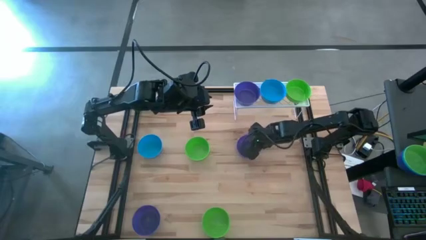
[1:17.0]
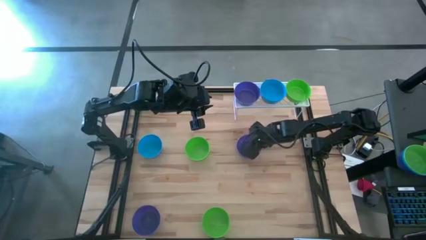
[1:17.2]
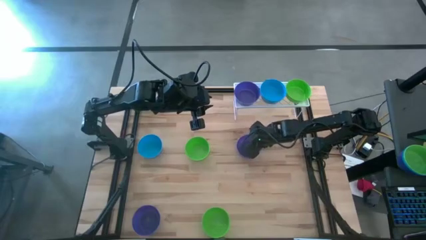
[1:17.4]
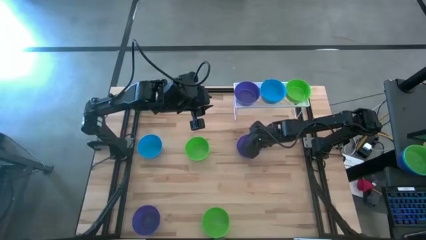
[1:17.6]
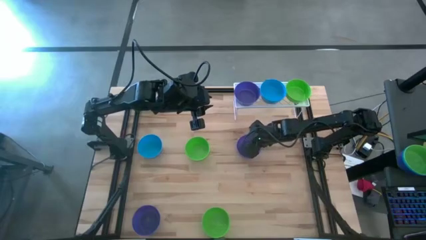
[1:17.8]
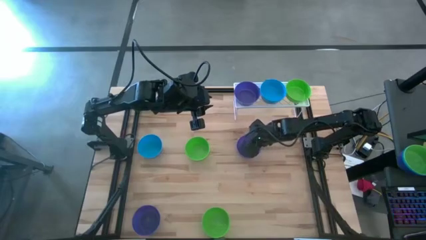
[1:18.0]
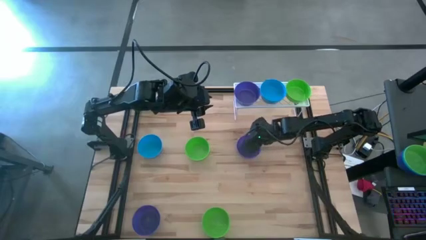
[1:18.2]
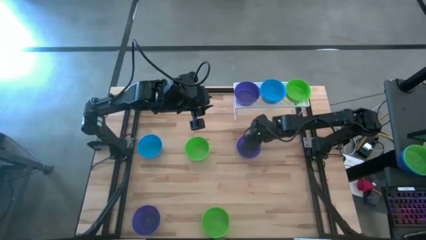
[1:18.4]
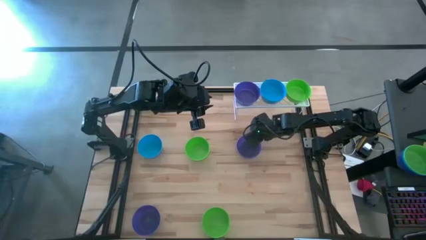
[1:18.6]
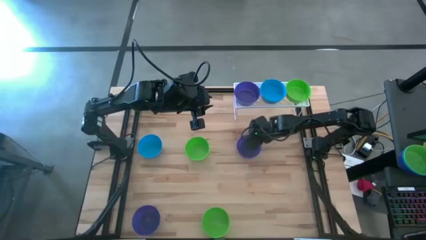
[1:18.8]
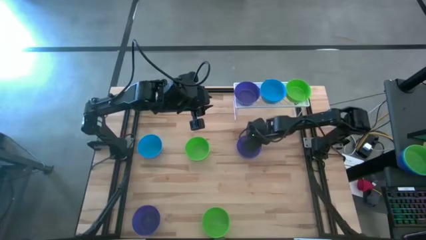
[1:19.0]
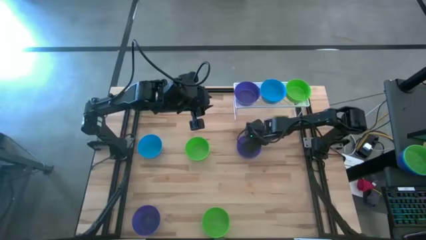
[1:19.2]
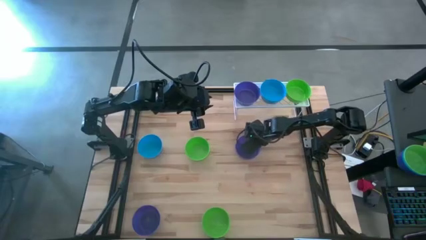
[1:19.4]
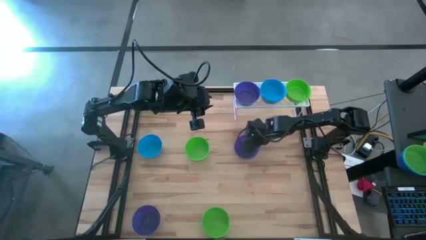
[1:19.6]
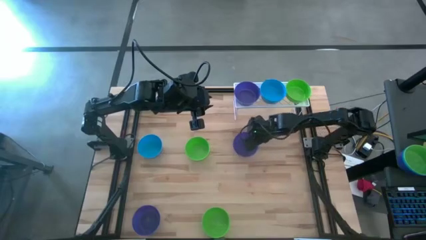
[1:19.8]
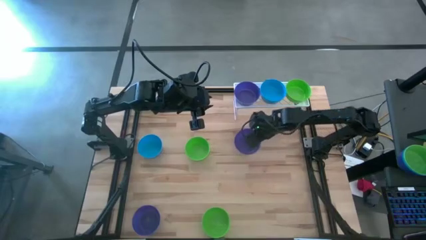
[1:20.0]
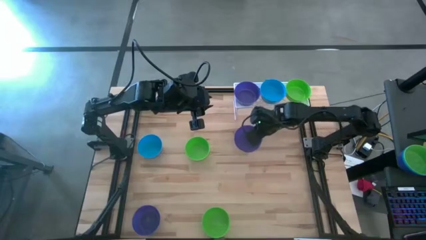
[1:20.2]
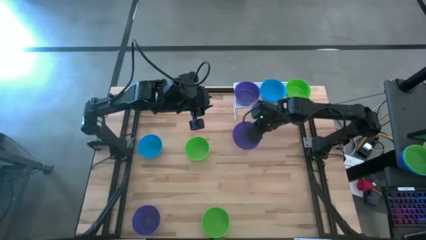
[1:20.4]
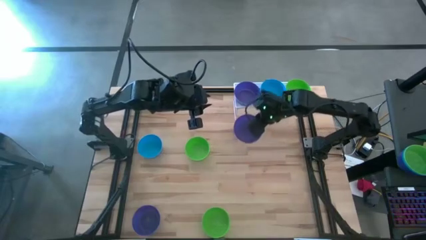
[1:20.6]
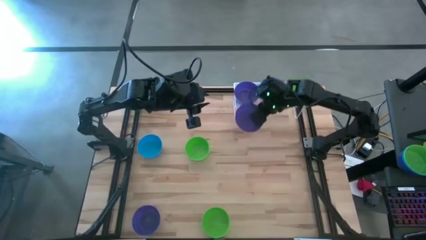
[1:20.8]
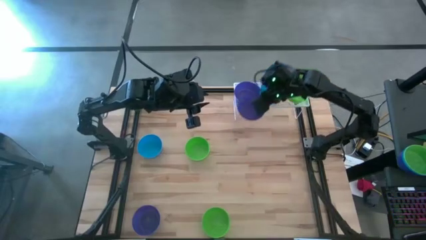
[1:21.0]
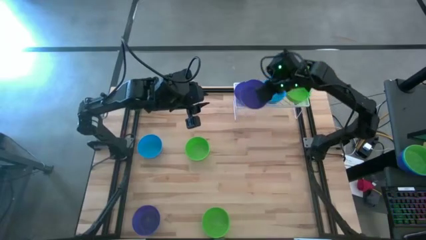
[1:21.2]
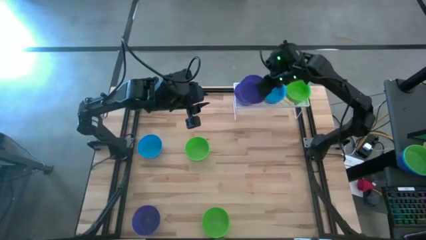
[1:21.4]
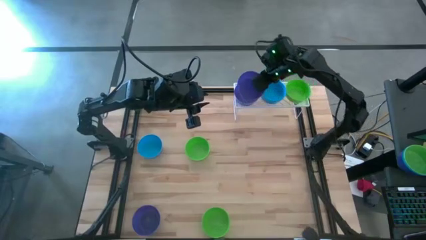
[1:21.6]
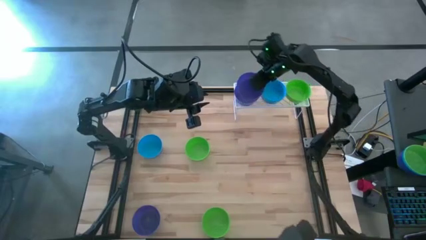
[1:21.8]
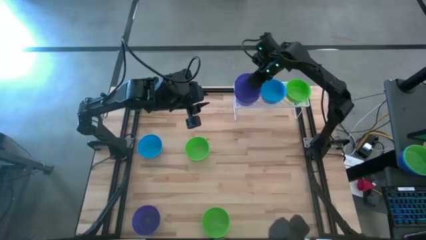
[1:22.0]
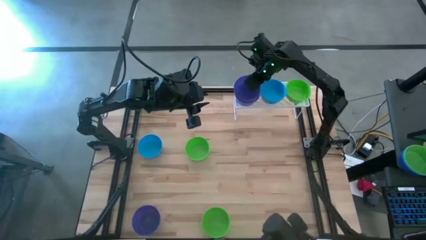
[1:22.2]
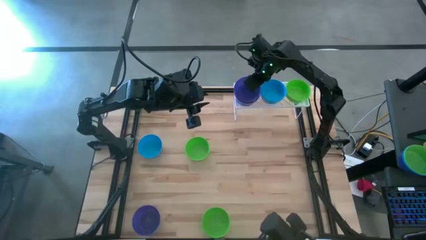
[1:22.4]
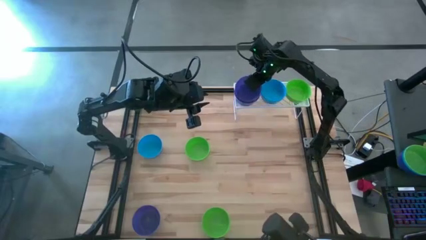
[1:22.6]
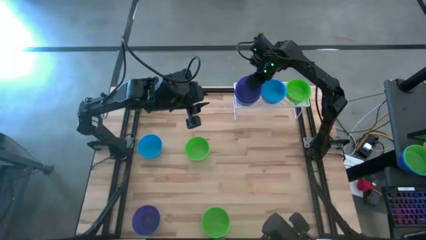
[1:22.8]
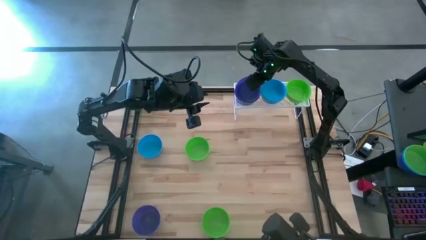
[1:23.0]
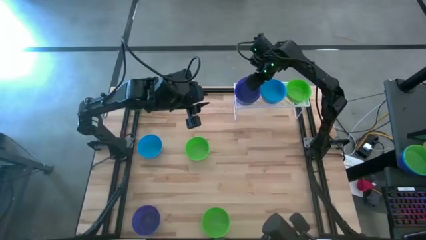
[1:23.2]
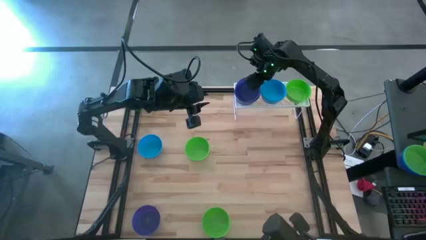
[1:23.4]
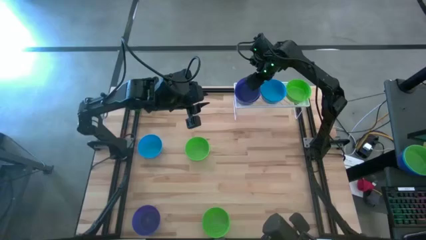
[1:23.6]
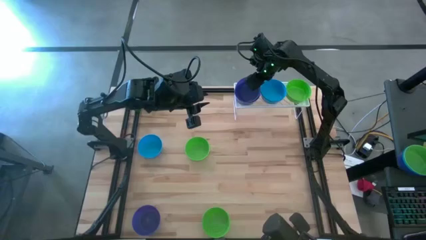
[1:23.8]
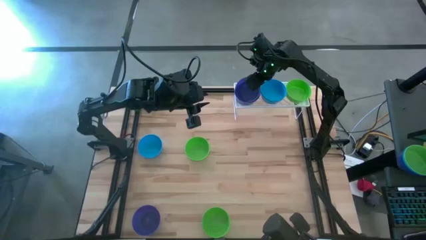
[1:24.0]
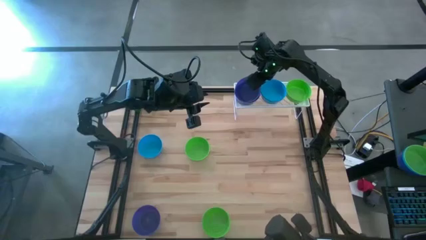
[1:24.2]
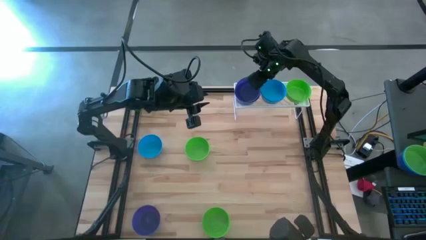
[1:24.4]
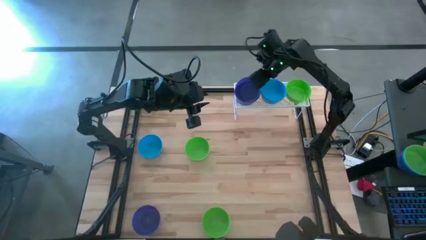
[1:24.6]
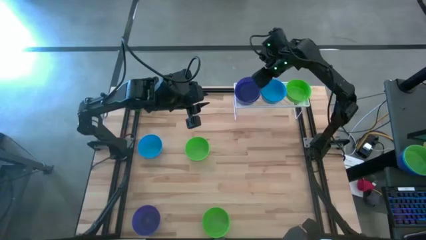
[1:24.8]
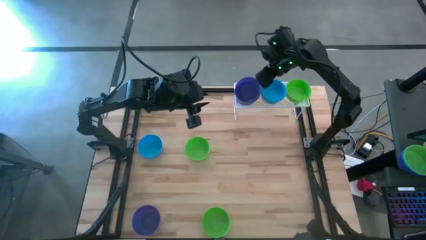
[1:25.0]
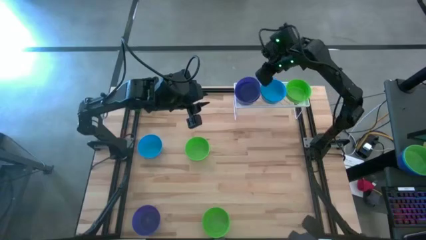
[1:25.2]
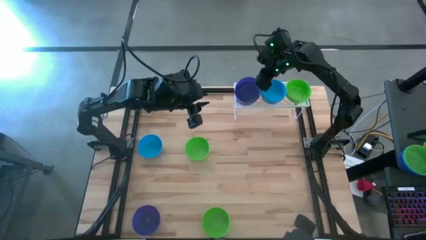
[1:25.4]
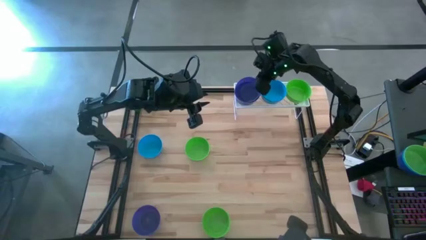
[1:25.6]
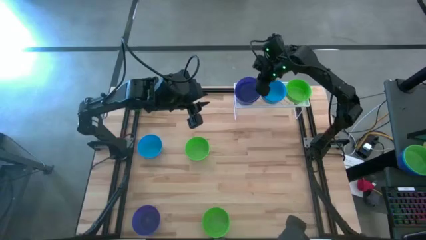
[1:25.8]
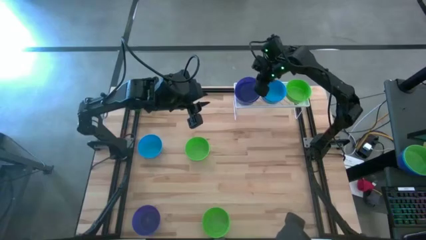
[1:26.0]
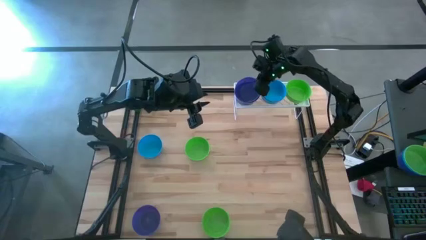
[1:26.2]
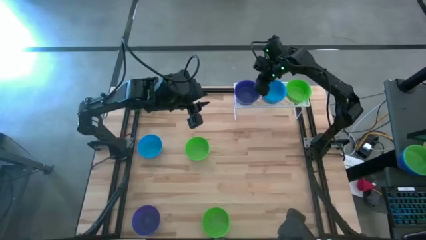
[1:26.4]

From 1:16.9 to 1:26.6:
Task: Pick & Place Mini bowls
Stack the right violet bowl on top of the violet bowl on the shelf

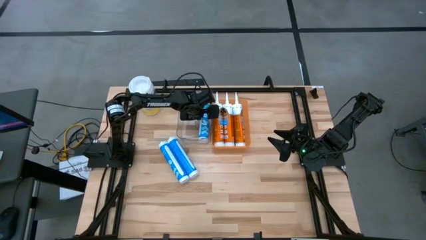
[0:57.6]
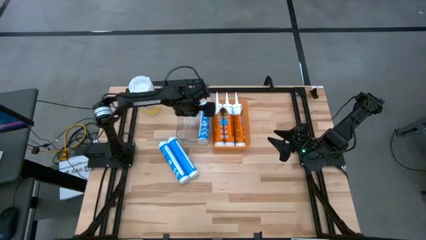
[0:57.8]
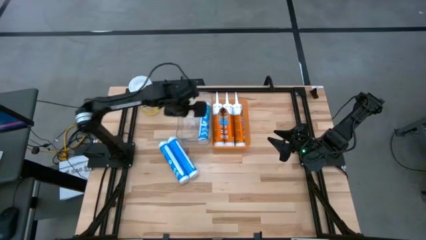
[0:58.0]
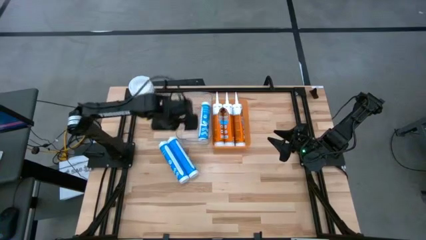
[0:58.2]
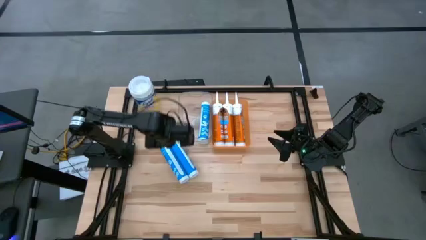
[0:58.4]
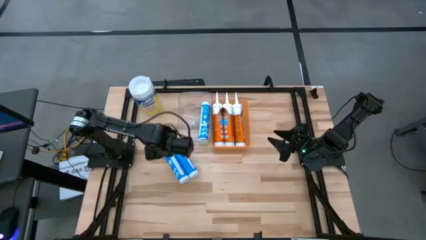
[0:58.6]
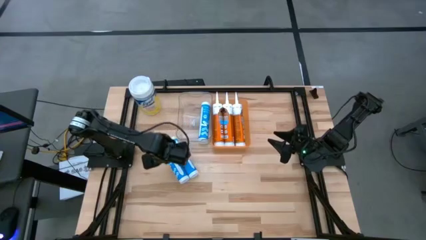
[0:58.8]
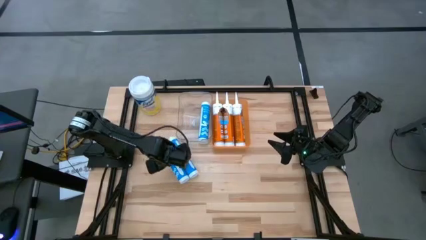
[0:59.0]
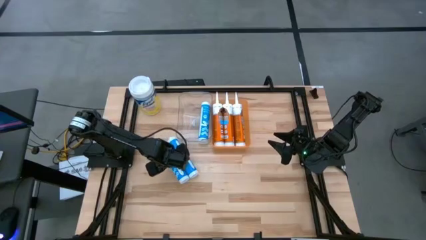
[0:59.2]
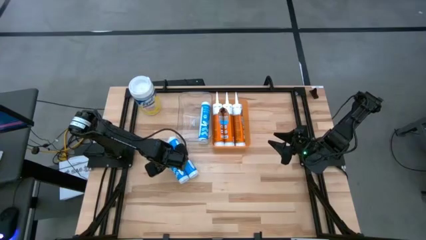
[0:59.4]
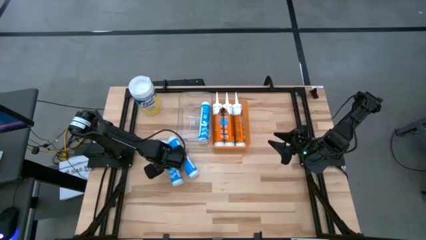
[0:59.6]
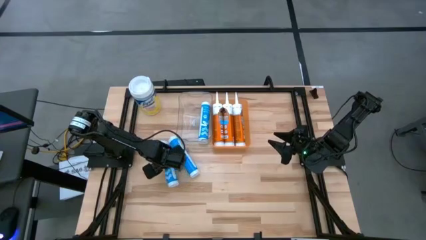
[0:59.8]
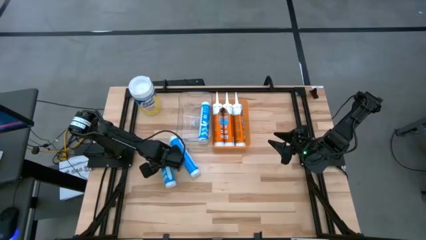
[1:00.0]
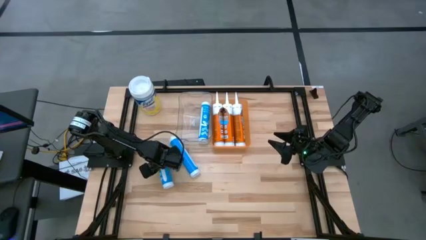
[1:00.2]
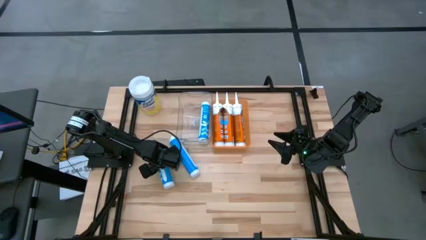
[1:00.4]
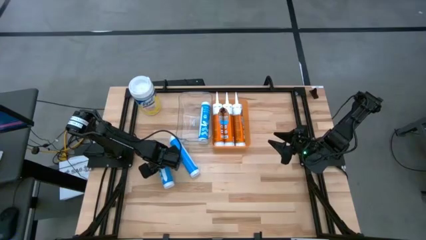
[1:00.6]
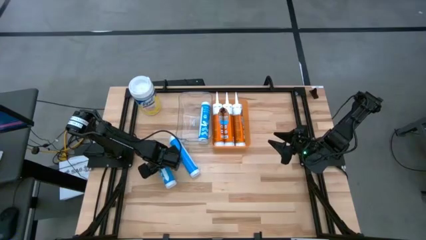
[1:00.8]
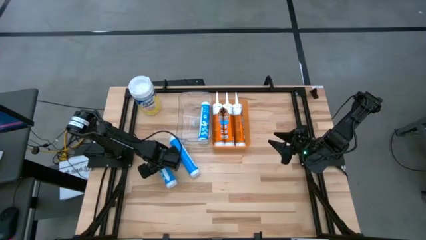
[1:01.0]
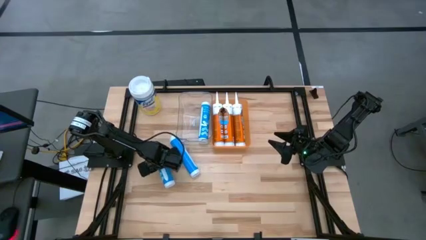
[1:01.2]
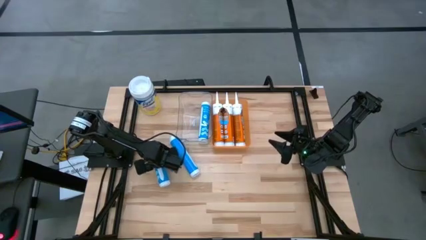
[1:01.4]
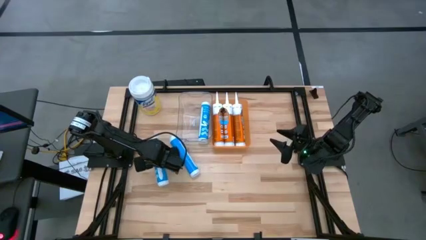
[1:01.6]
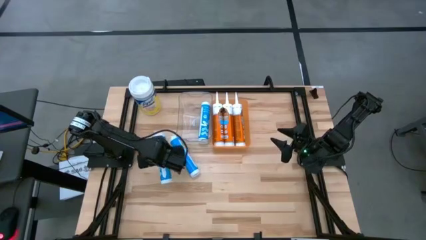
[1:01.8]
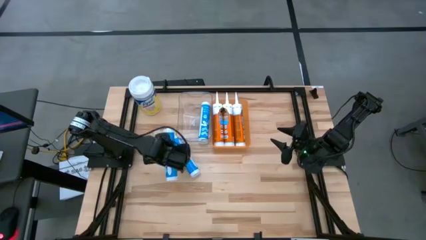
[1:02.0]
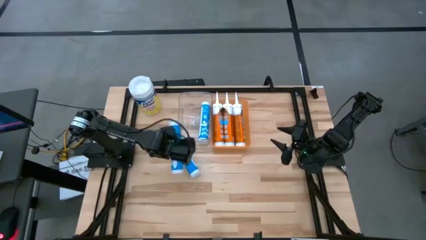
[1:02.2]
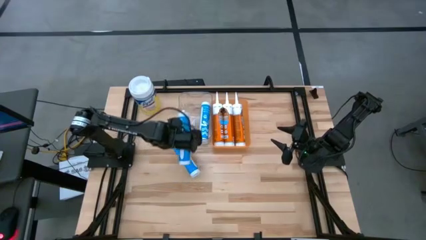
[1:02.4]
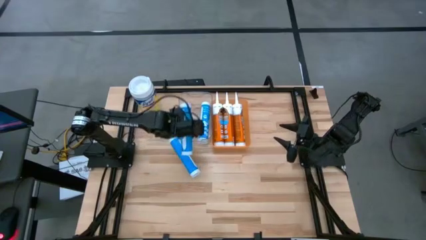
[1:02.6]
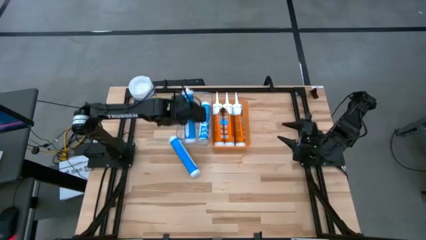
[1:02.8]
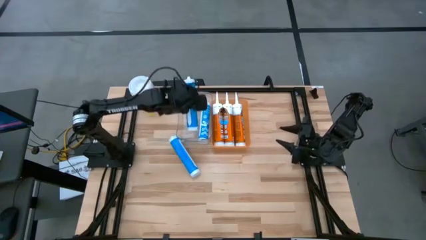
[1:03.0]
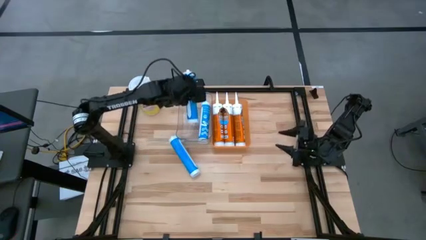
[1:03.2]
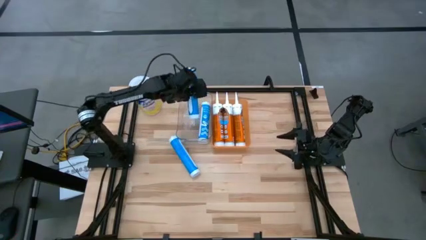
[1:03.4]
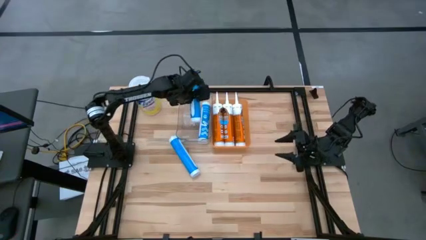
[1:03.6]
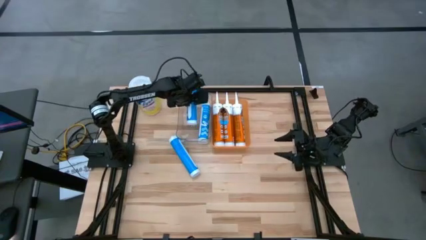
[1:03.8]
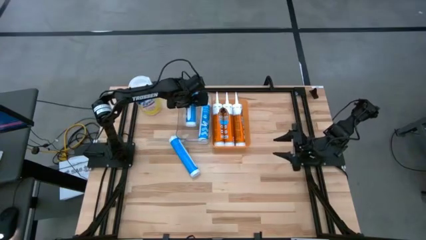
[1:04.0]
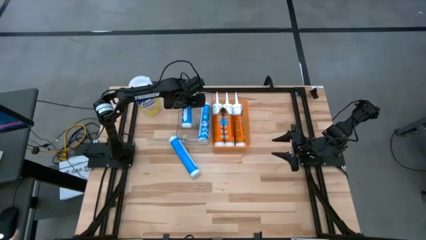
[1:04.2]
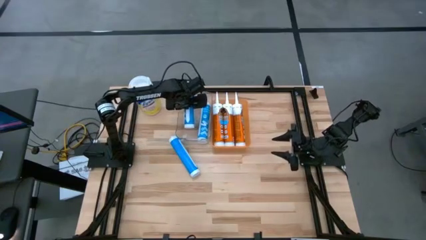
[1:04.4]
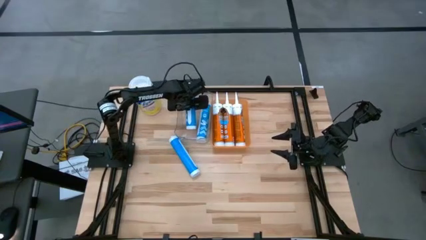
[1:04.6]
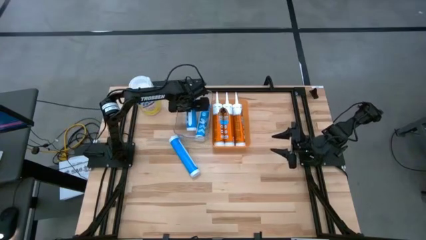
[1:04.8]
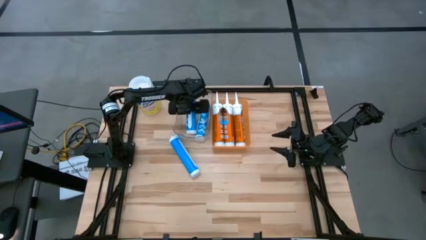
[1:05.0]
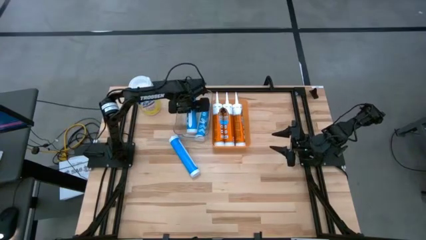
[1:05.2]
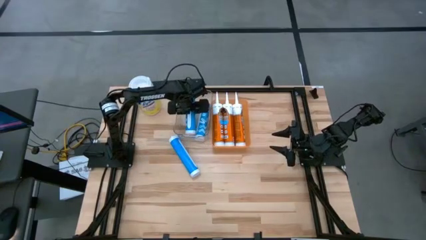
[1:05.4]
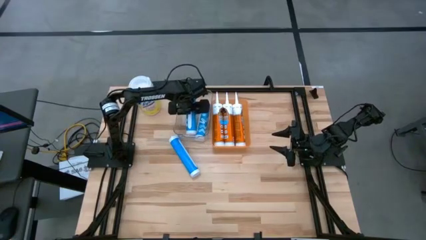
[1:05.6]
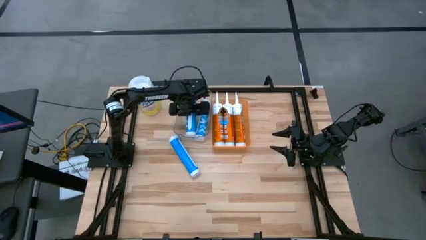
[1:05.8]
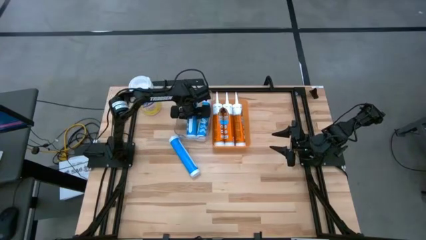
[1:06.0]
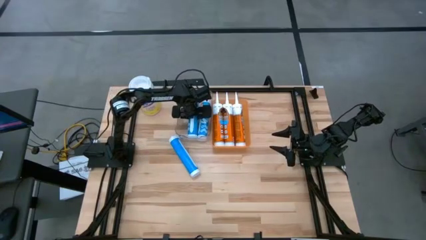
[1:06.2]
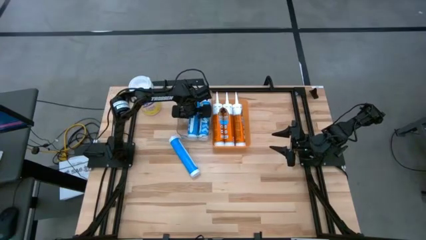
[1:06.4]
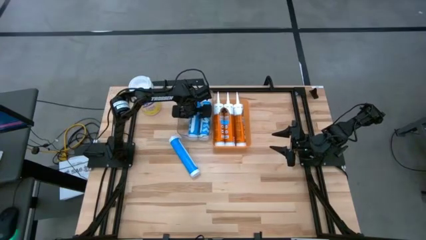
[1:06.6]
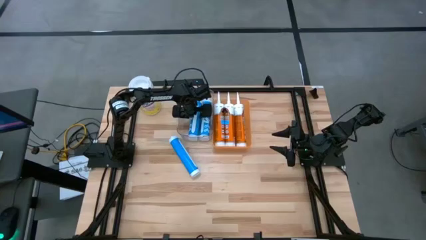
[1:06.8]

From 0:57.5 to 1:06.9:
Task: Pick & place silicon tubes, Sealant and Lysol wipes
Put the left blue sealant into the transparent bin
